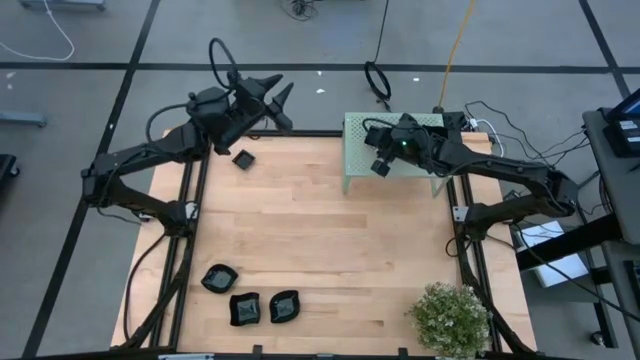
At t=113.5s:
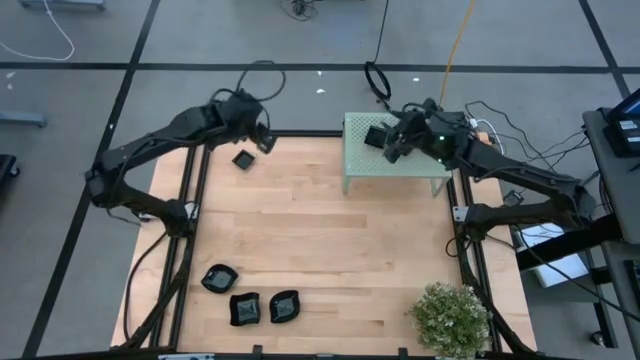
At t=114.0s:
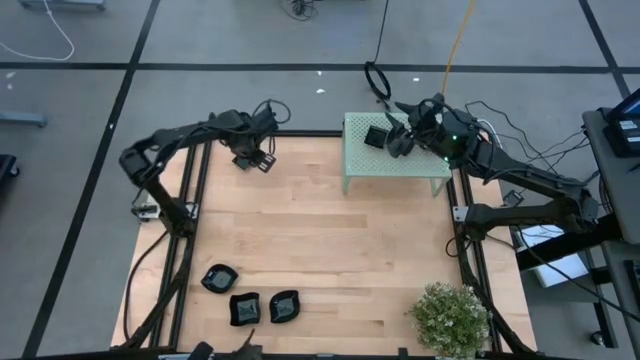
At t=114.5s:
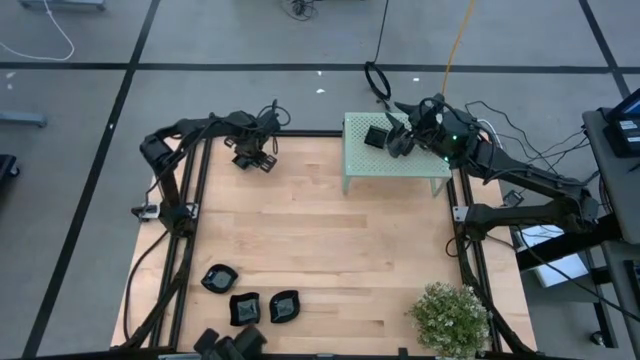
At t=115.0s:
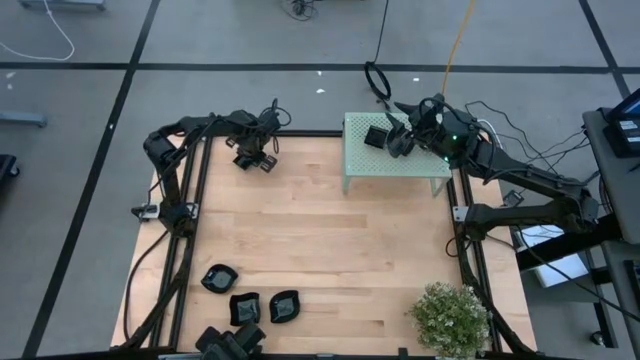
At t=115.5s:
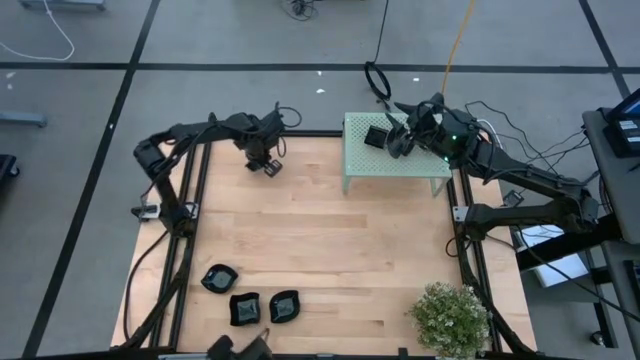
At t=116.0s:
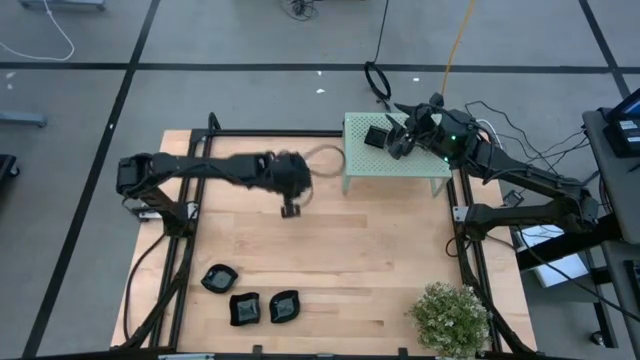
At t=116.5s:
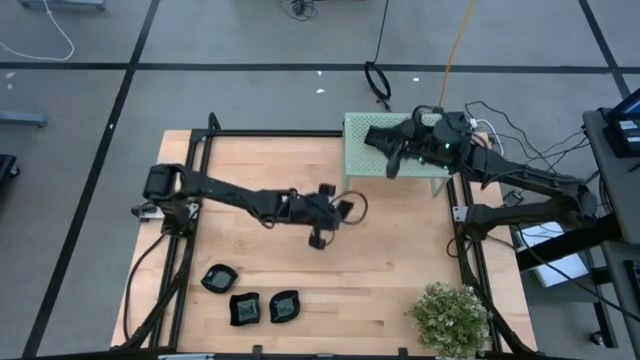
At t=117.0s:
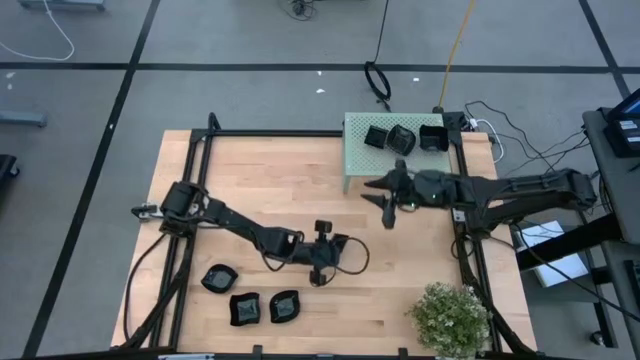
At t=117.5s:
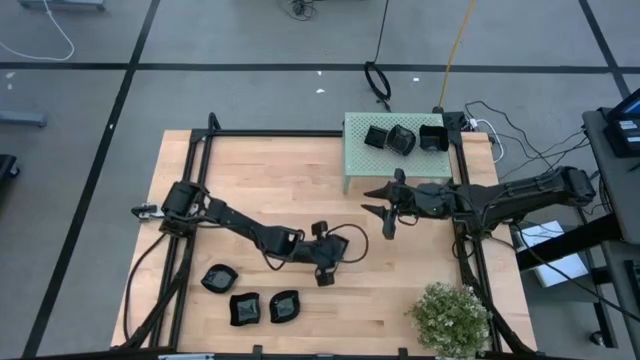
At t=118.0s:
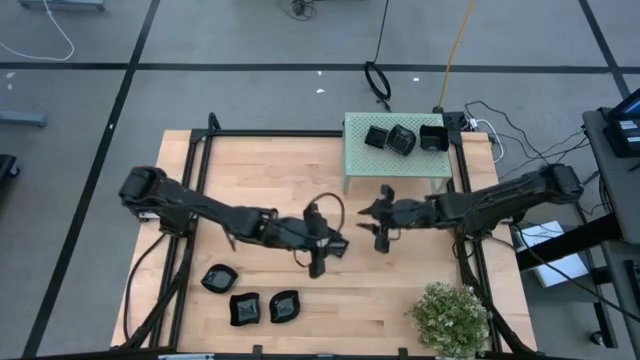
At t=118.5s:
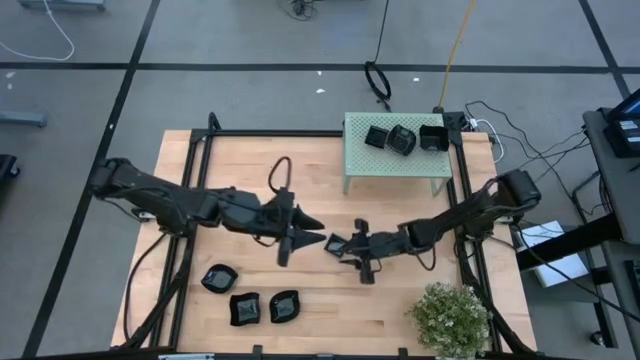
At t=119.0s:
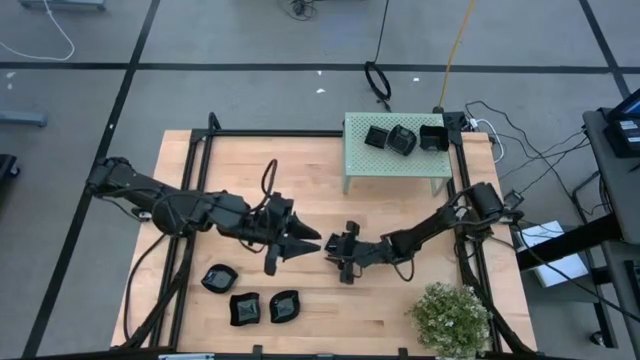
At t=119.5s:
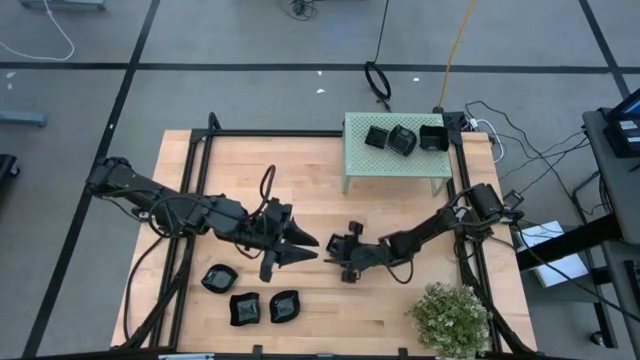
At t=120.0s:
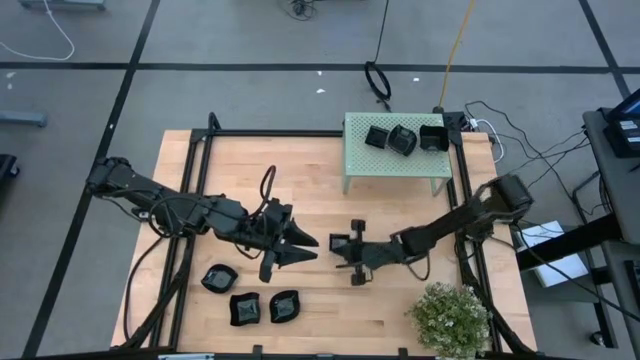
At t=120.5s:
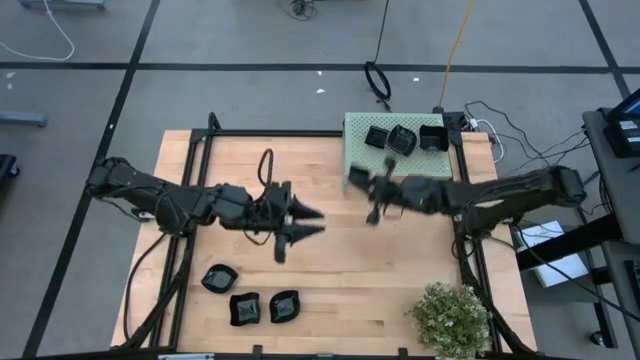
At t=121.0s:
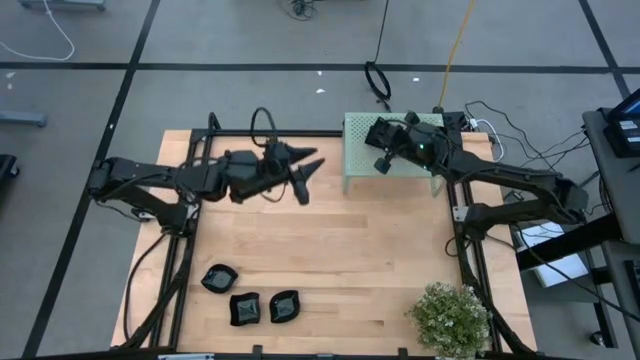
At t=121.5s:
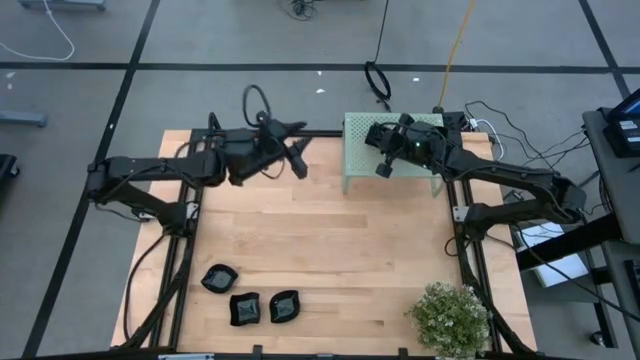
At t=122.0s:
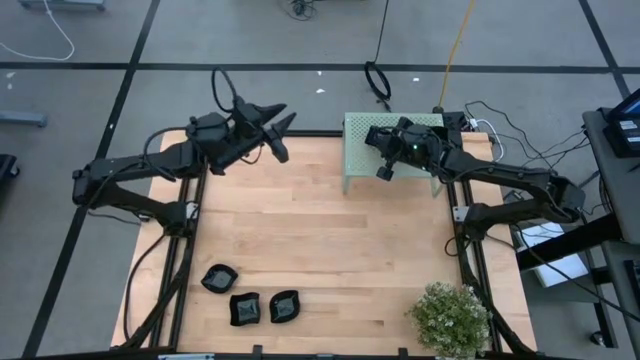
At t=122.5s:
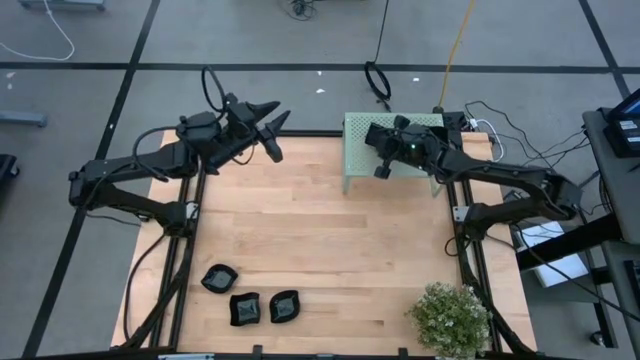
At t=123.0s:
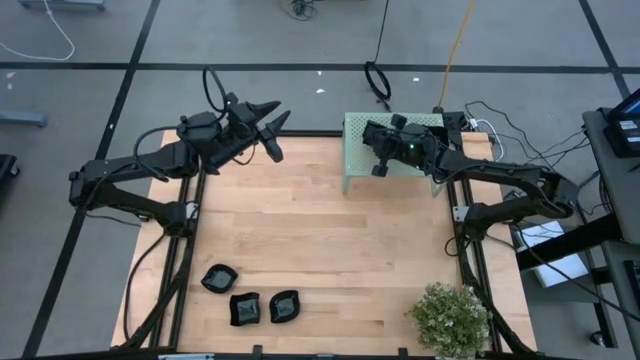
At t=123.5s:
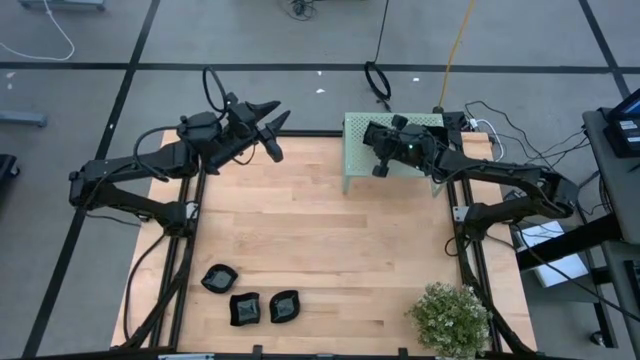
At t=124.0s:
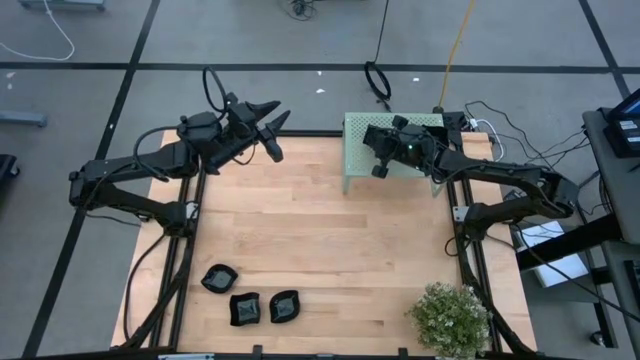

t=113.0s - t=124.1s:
Task: Pick & Place Mini shaped plates
Stack the square plate on top of the square plate on the shelf

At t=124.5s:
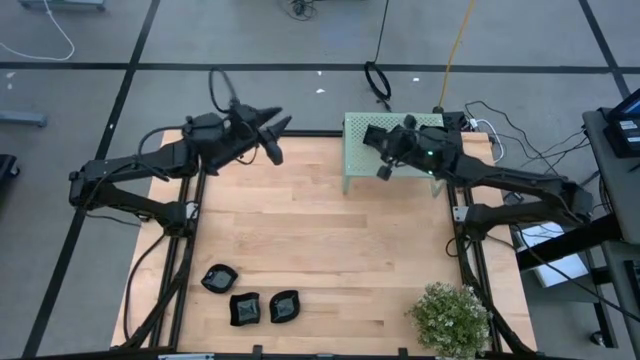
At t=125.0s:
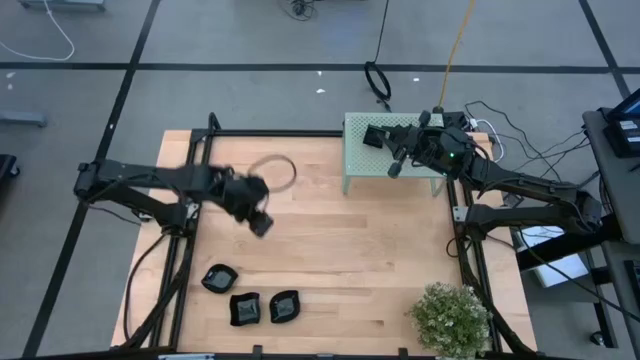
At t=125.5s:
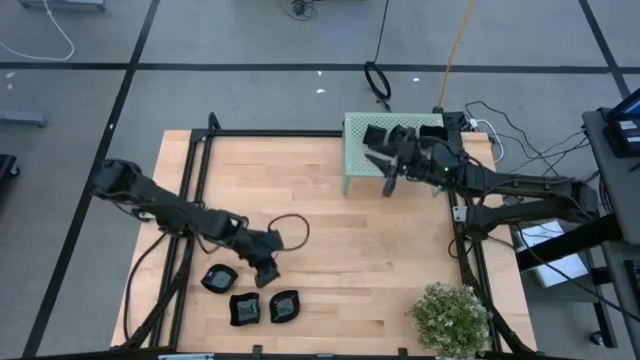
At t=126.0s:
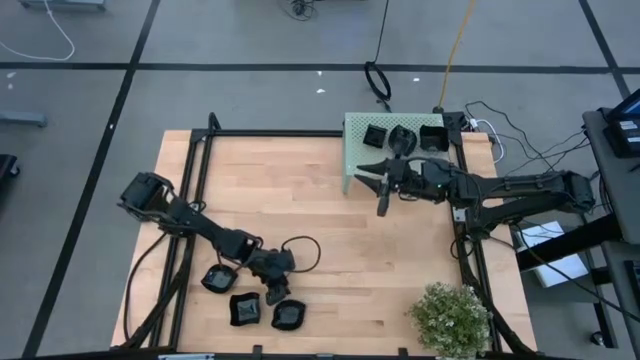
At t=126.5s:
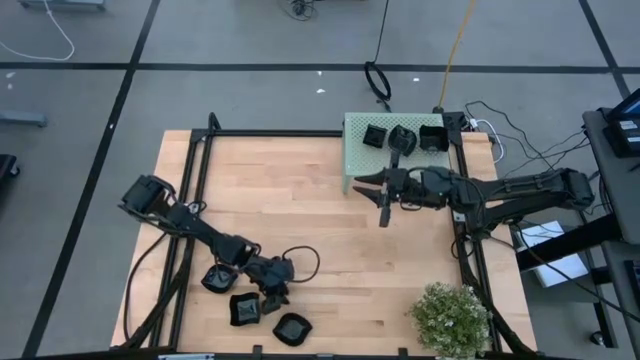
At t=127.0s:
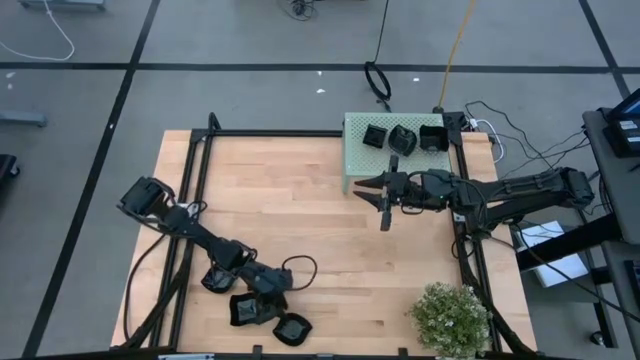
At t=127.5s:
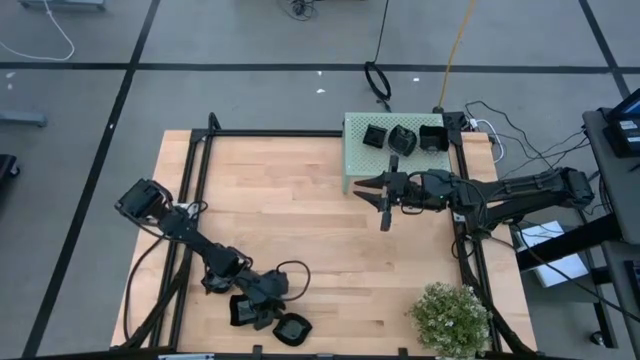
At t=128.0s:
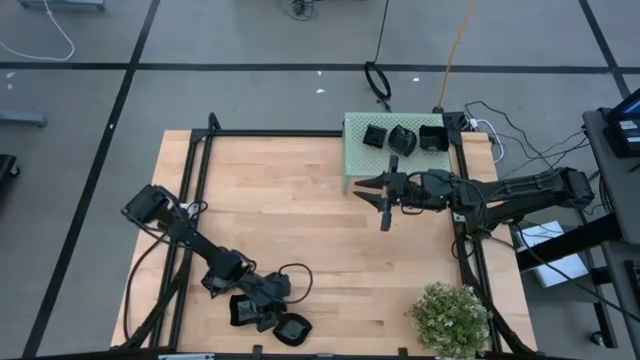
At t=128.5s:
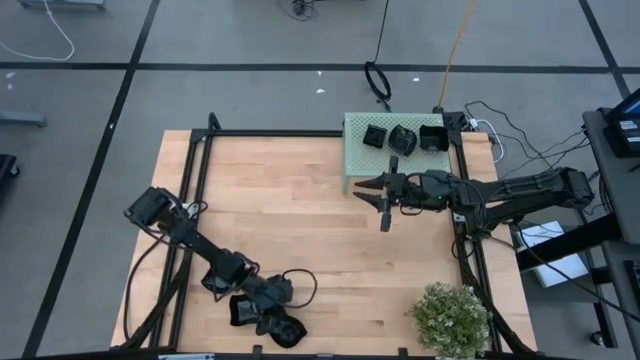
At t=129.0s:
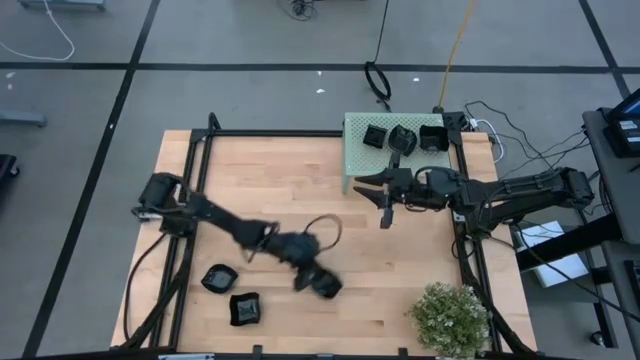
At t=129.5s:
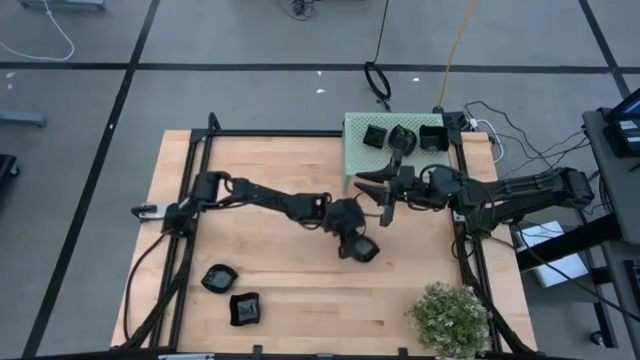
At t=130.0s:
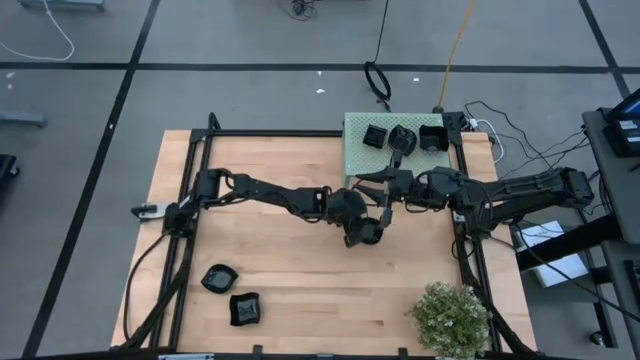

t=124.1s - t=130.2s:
Move the bottom leaf-shaped plate to the center of the table

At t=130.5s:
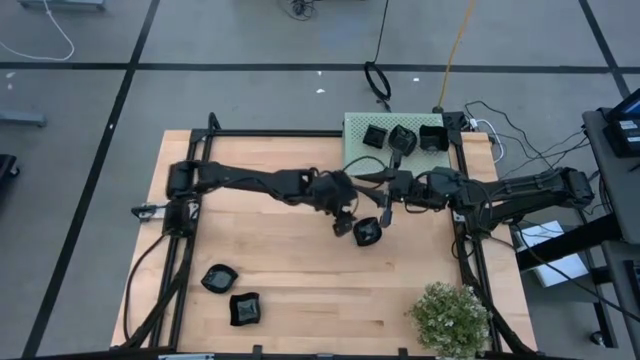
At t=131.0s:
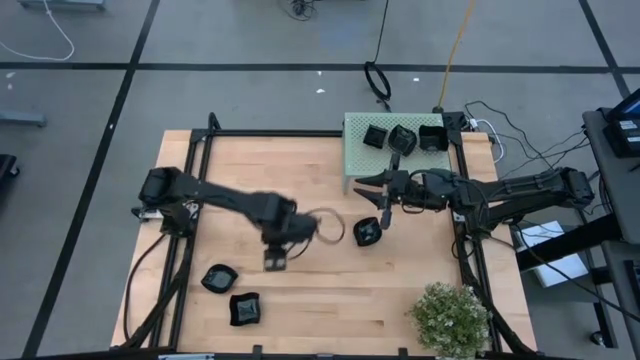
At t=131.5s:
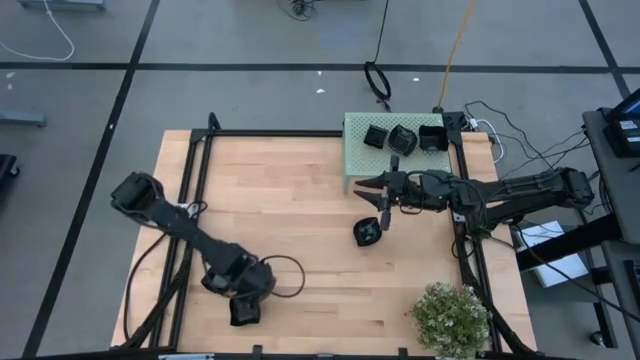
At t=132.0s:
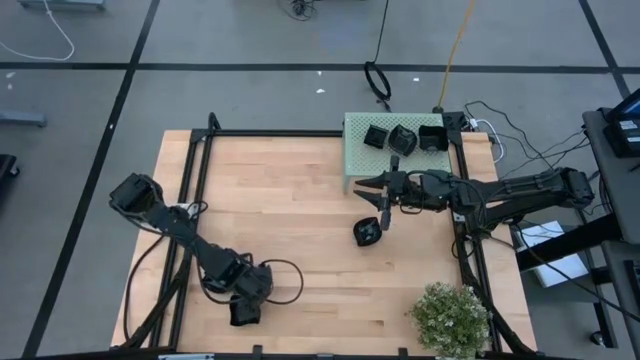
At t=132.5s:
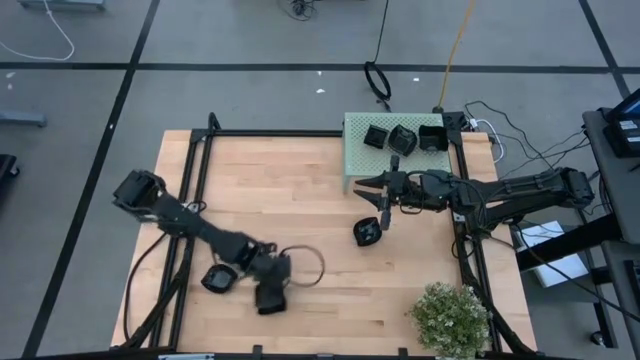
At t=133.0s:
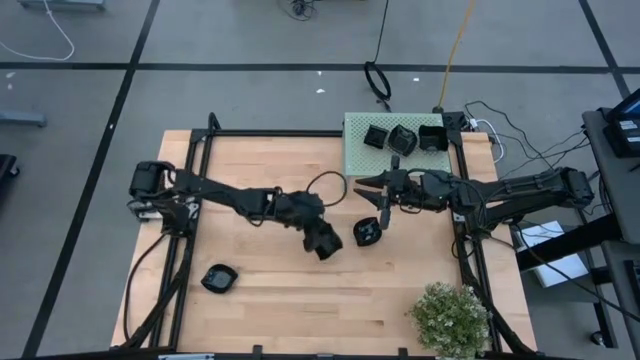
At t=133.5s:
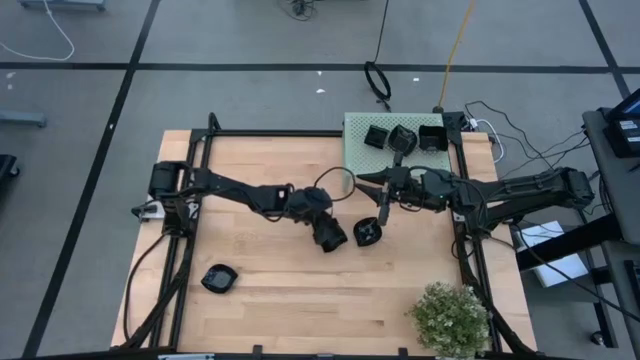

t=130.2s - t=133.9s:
Move the distorted square plate to the center of the table
